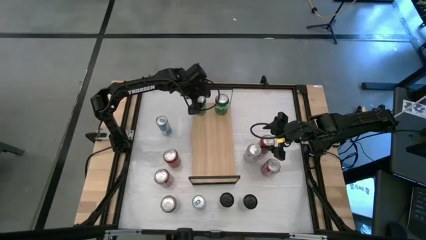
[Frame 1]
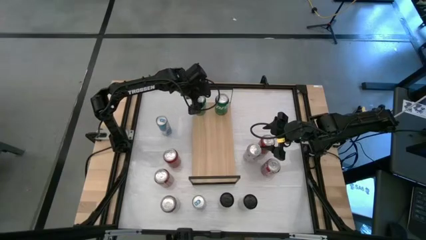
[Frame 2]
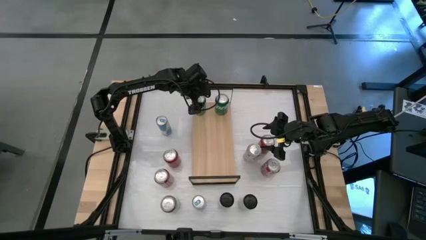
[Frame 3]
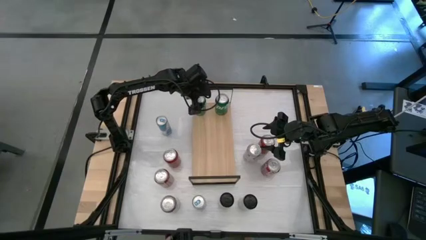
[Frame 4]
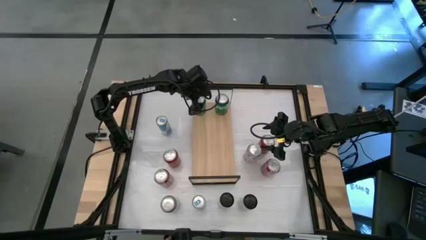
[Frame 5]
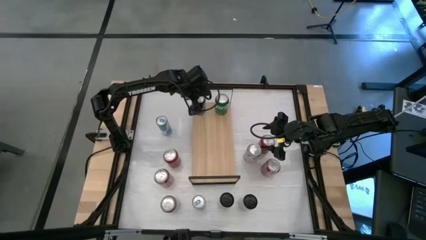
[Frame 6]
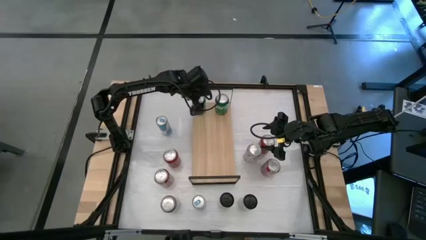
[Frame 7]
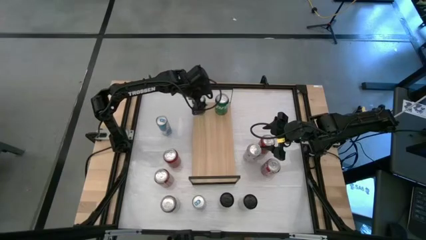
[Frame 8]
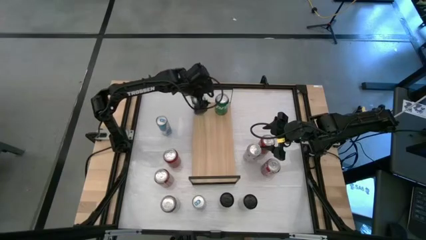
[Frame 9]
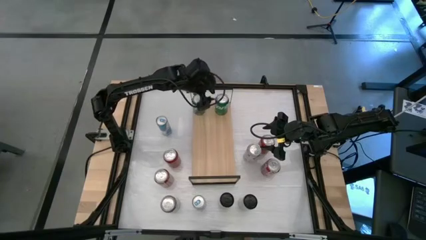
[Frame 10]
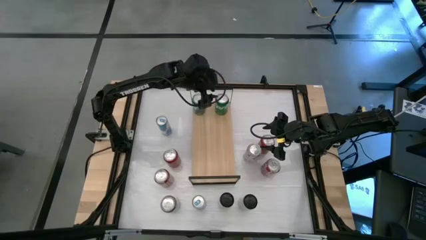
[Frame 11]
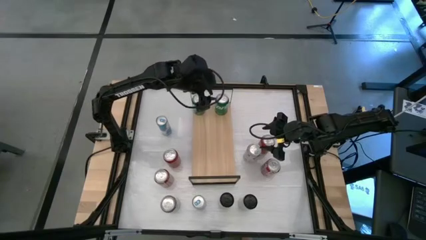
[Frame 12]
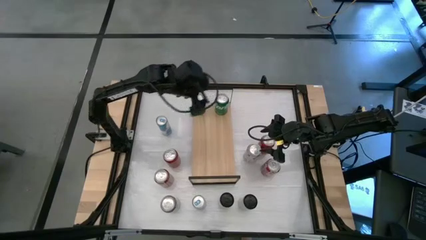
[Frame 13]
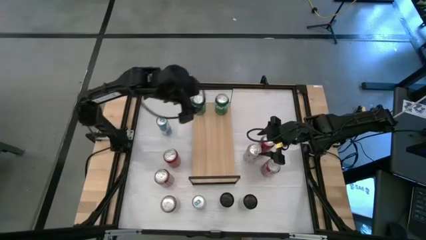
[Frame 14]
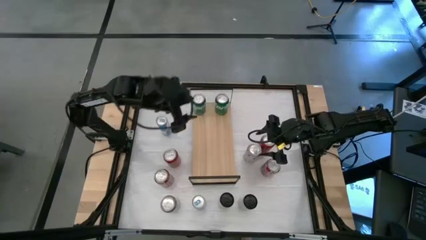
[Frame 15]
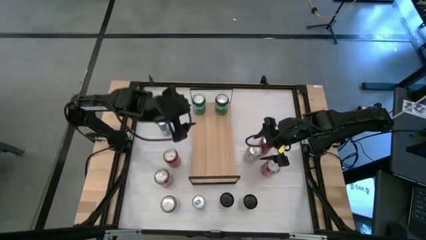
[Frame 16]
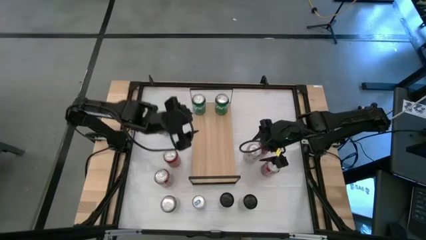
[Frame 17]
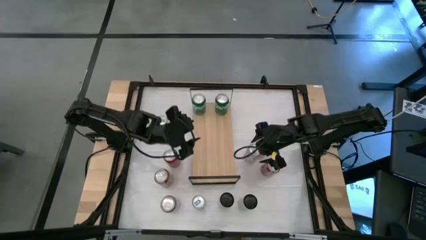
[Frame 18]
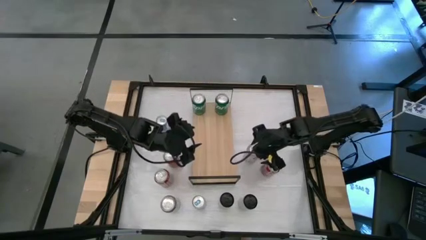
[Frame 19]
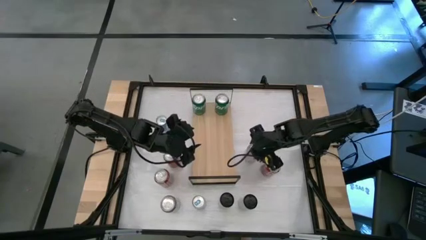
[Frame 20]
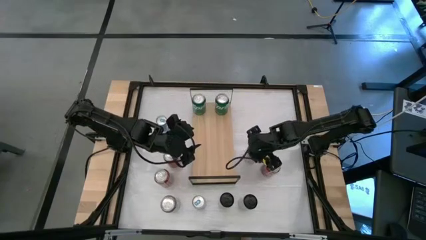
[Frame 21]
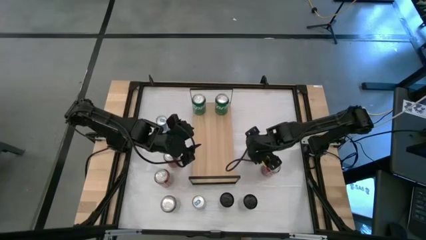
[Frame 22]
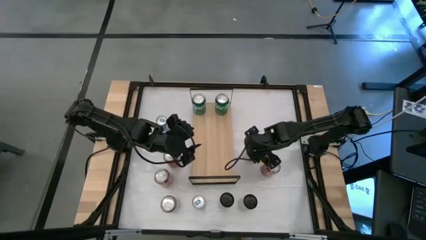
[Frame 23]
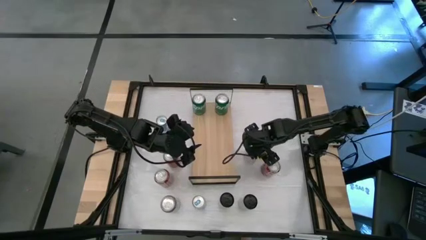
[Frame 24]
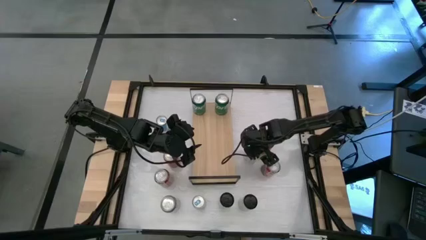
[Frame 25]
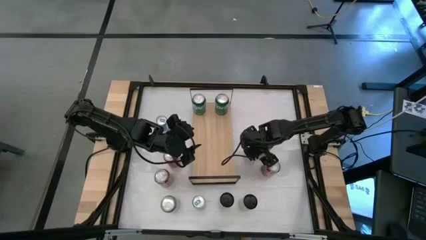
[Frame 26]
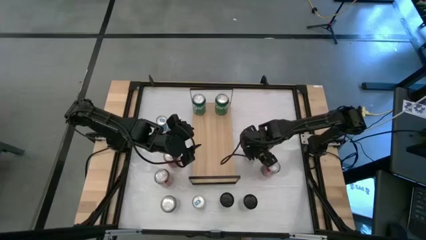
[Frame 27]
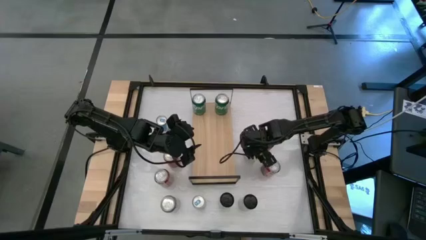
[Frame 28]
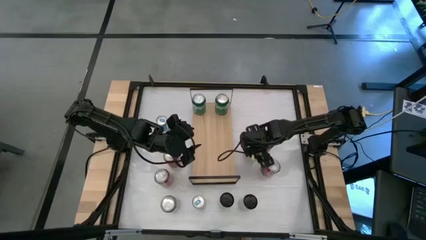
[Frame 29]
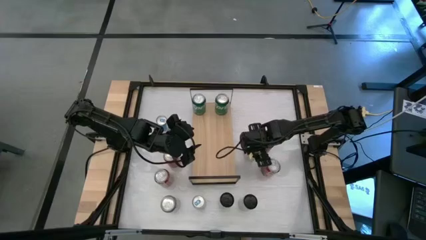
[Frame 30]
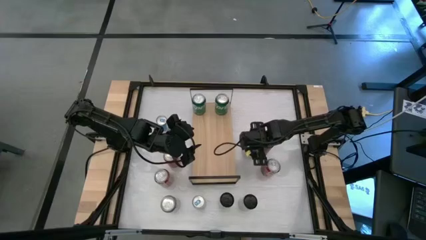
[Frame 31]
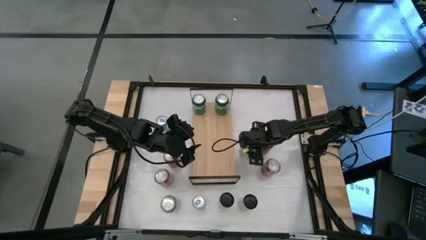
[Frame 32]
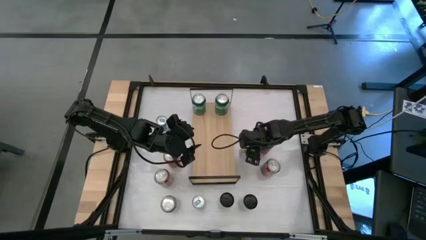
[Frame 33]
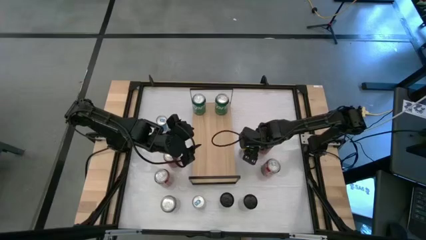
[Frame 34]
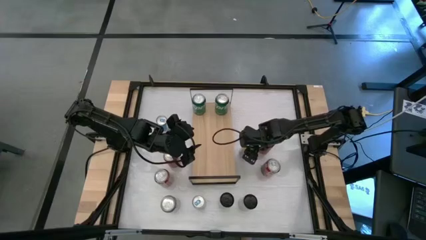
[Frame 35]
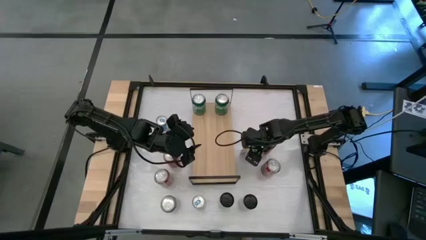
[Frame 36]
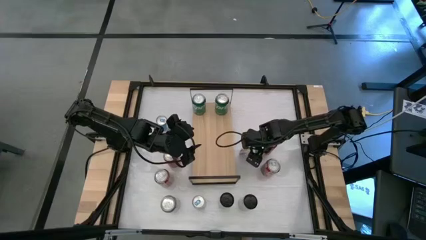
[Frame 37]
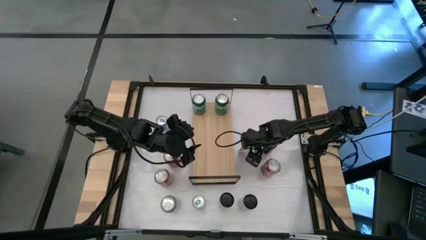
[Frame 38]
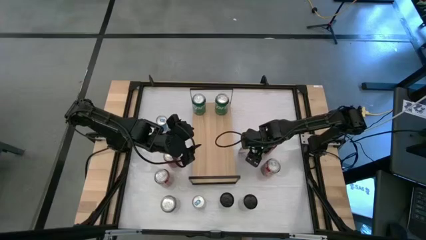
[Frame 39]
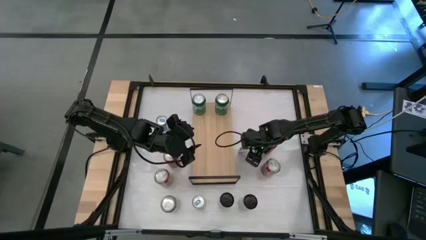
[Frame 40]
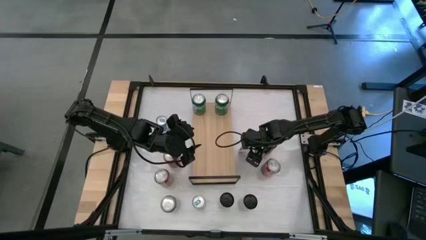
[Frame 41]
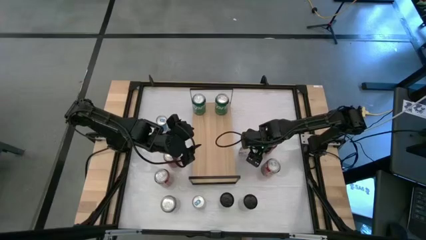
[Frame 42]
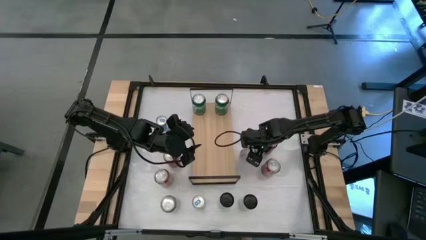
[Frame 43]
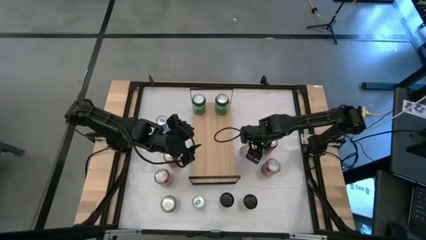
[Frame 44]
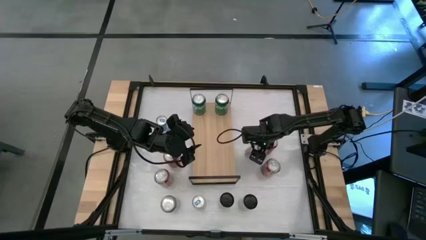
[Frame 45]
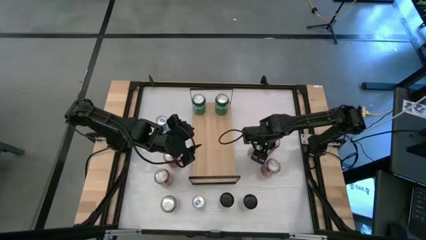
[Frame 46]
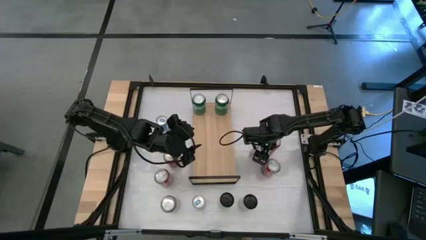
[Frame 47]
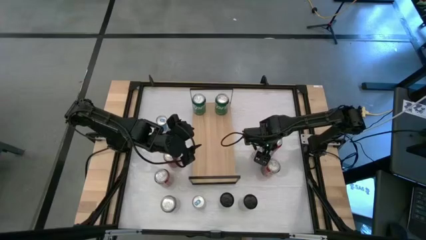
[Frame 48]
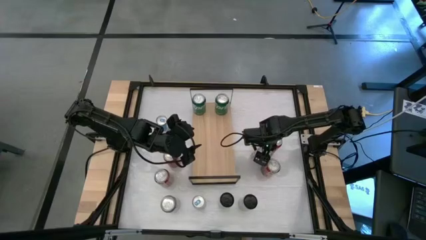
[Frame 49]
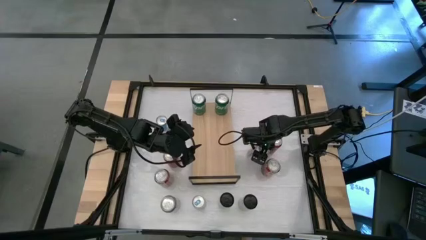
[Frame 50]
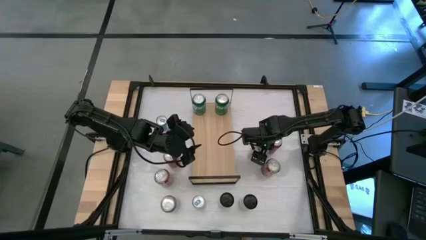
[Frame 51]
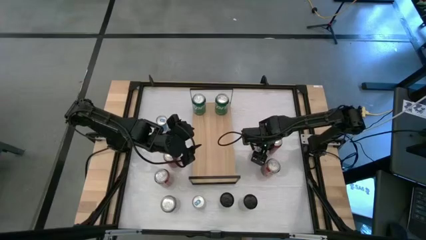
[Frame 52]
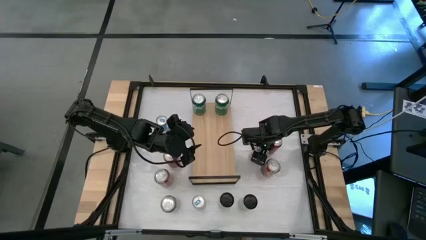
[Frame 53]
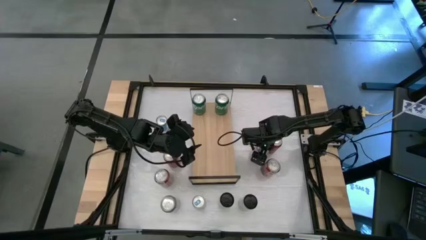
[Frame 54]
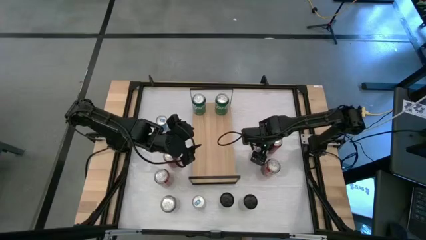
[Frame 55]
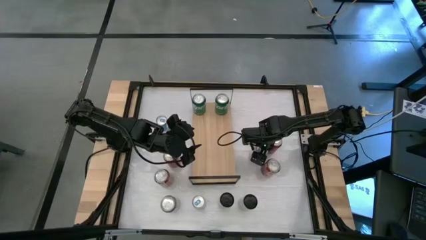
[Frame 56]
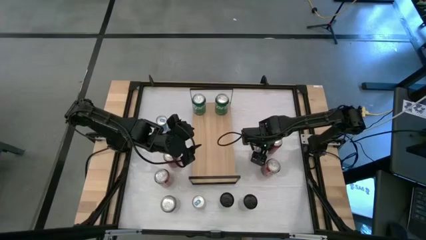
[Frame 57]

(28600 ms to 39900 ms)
Task: Place canned beverage on shelf
Put the top silver soda can on the shelf
